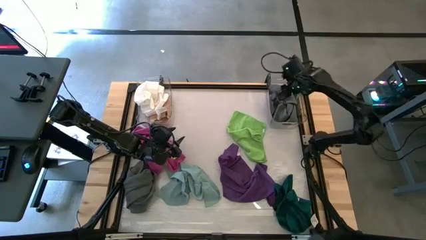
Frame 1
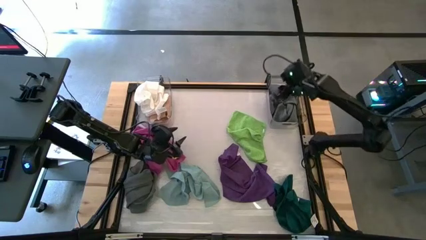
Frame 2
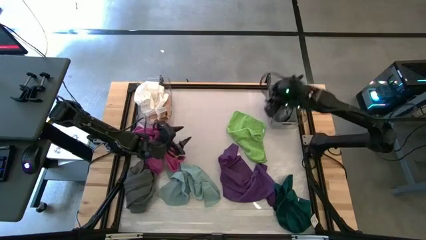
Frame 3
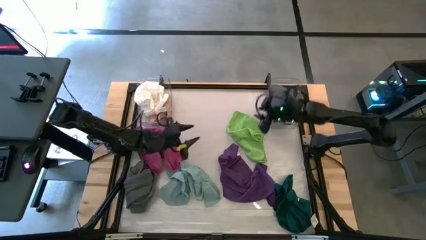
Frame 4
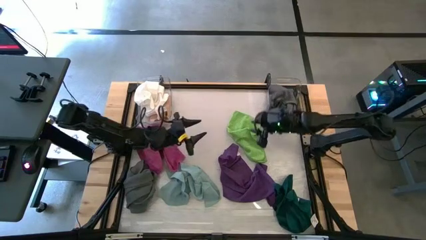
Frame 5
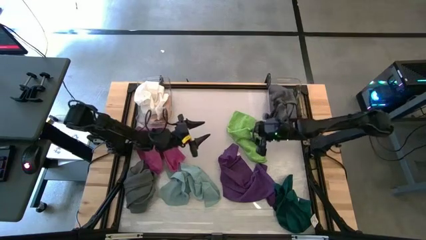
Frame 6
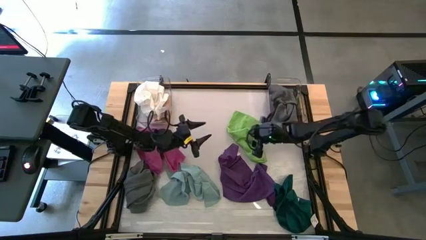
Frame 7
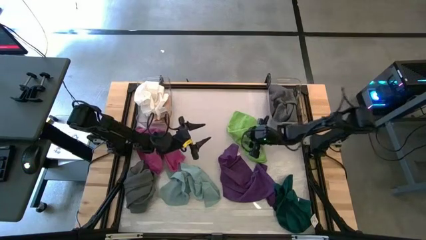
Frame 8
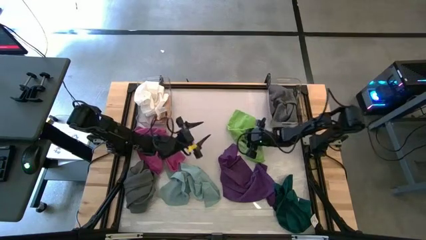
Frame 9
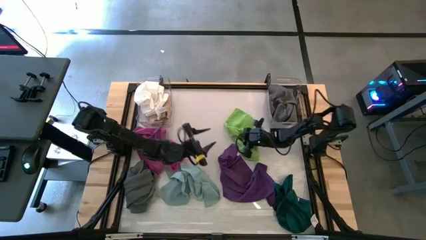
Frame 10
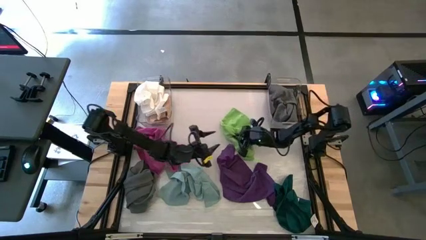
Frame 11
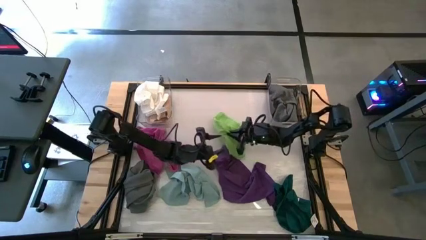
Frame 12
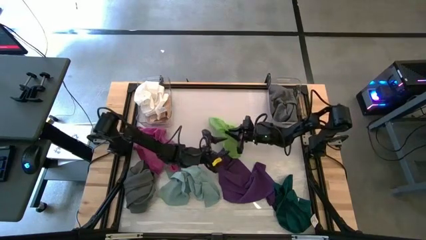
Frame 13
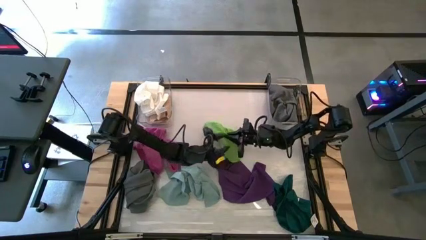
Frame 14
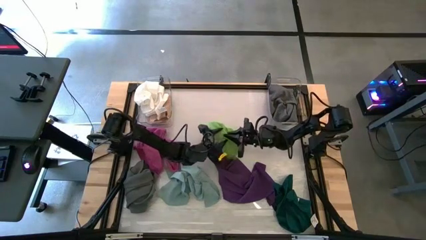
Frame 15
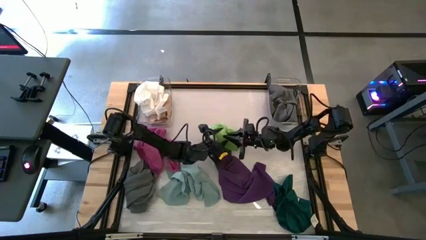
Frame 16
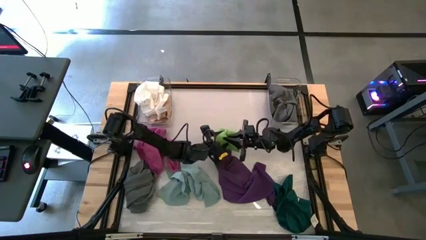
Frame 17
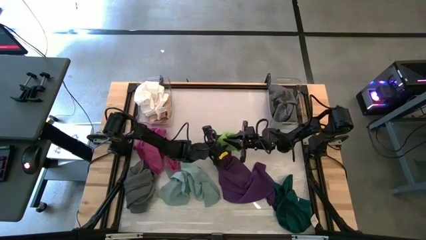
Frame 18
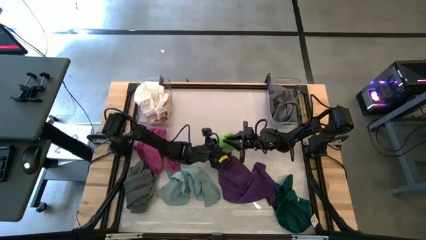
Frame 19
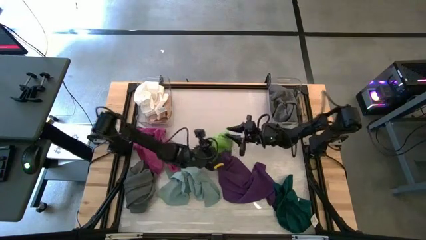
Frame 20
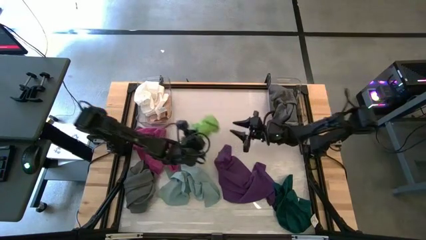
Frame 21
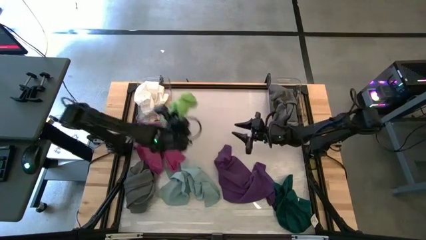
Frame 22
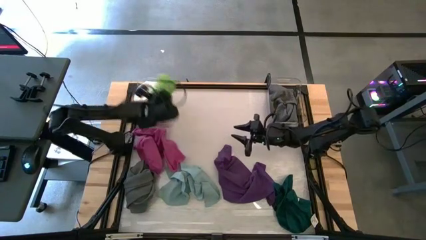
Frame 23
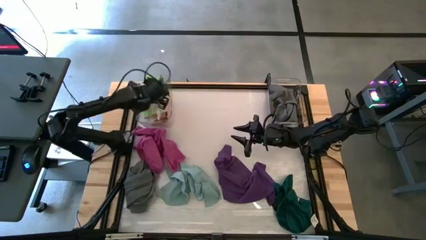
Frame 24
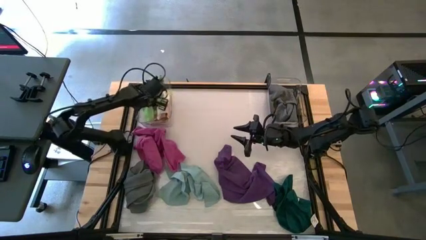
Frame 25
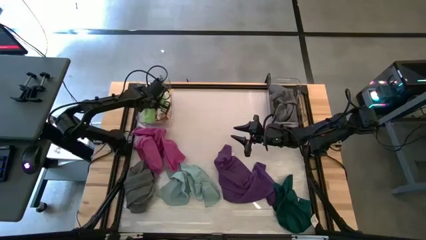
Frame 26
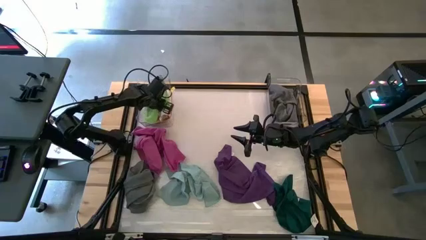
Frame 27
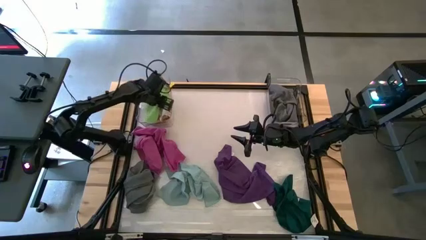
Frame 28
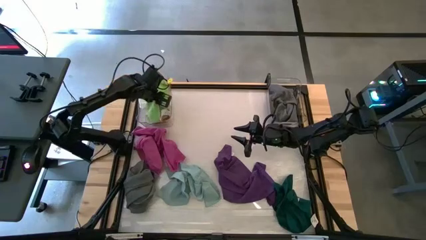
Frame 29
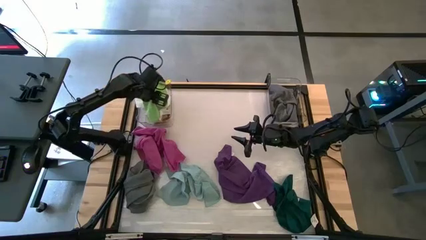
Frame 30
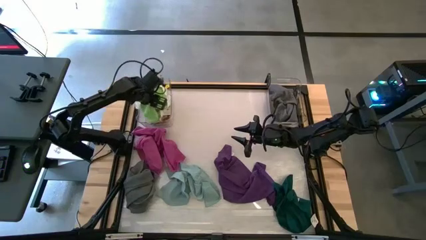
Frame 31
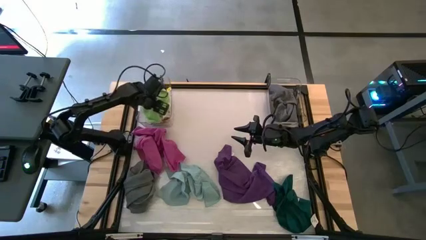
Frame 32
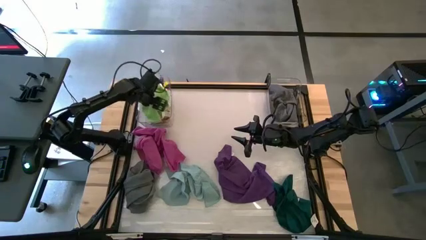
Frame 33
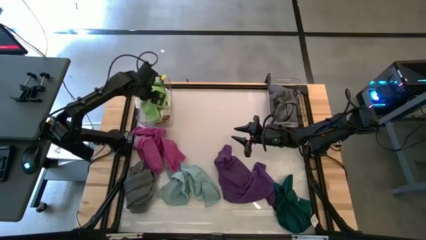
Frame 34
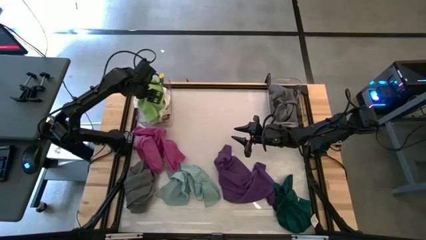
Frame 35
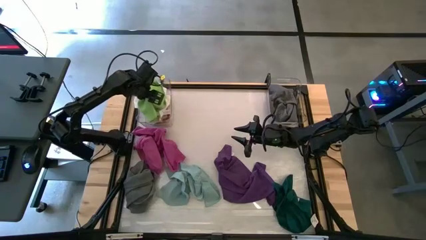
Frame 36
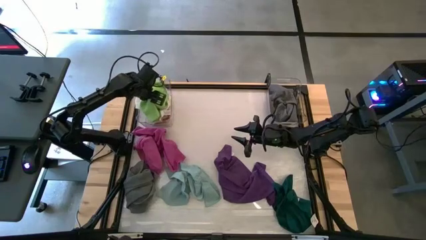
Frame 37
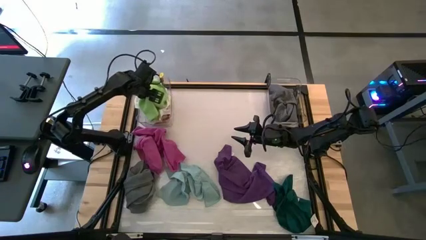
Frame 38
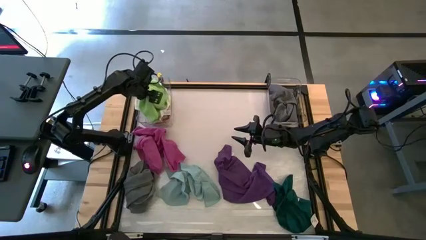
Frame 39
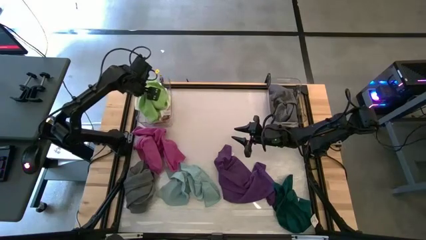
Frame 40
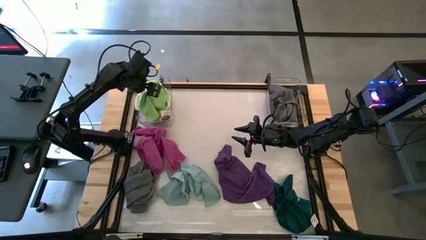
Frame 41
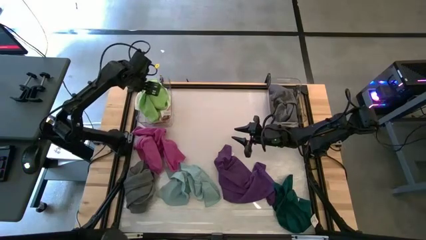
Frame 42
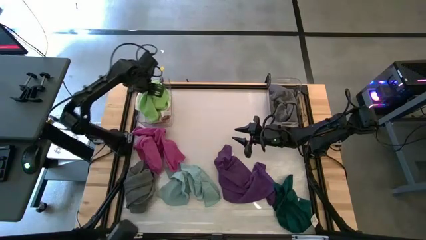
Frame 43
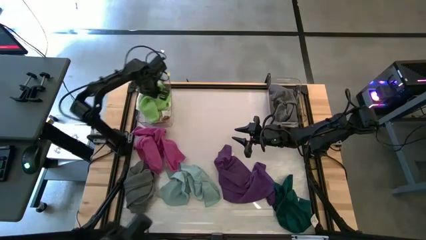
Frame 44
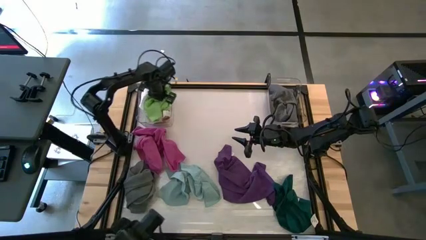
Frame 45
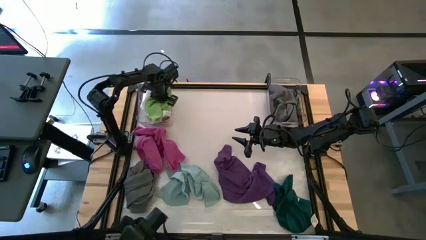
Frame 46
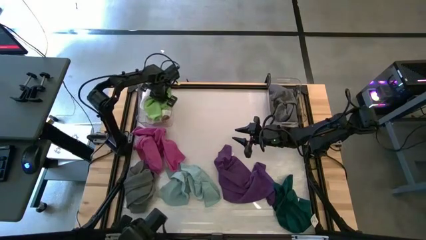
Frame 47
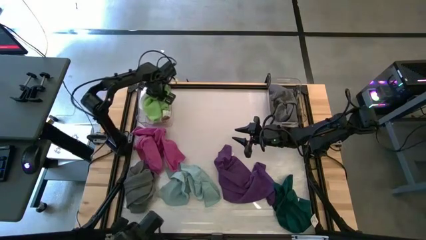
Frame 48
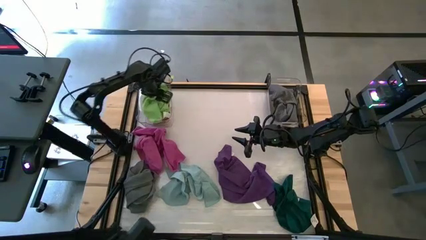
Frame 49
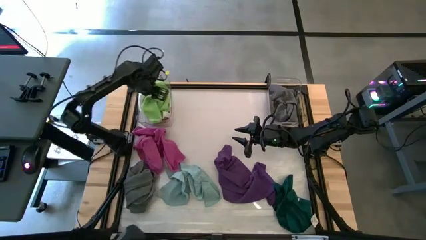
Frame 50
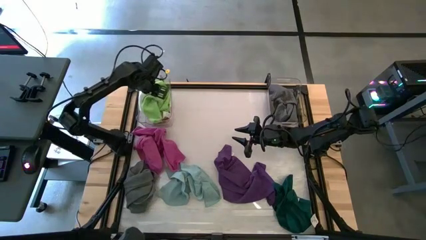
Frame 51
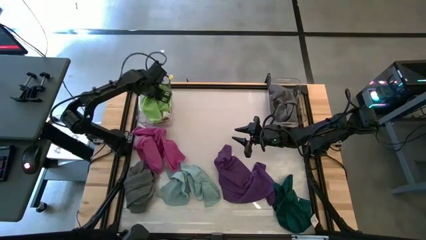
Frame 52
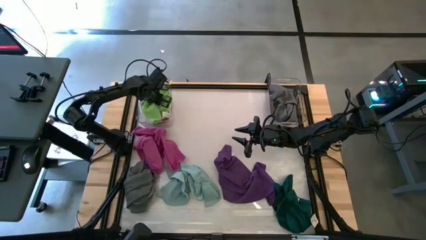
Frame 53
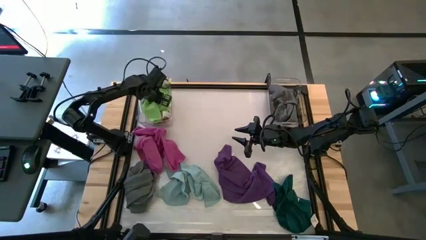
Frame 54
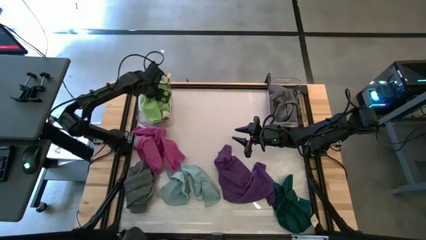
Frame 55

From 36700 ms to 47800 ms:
Task: Sort towels by color in basket
Put the green towel into the left transparent bin
